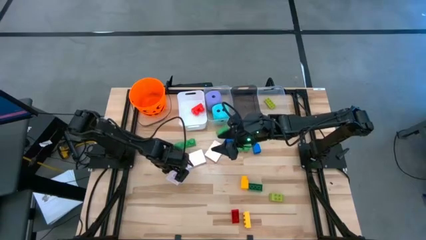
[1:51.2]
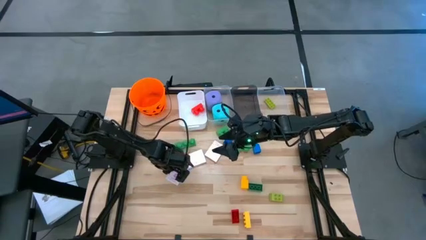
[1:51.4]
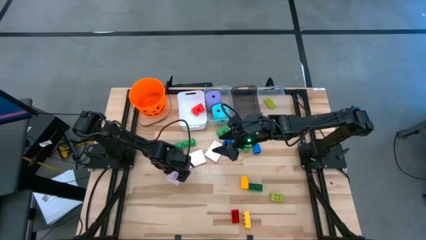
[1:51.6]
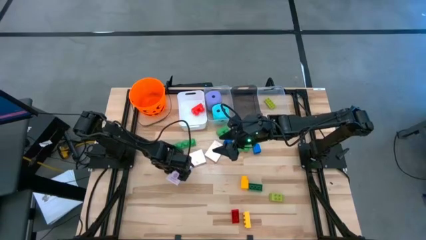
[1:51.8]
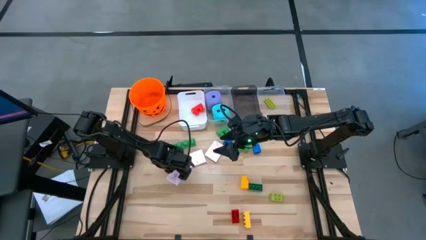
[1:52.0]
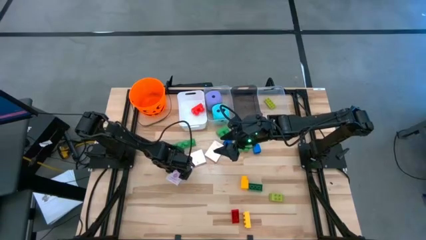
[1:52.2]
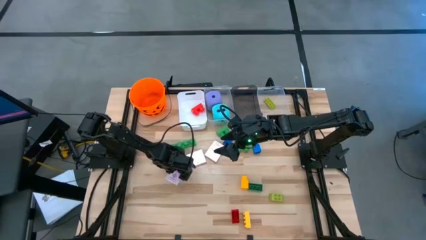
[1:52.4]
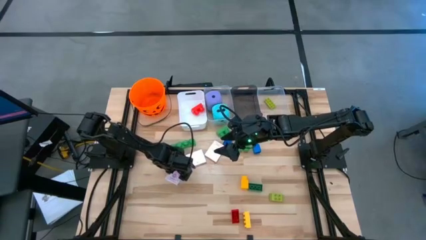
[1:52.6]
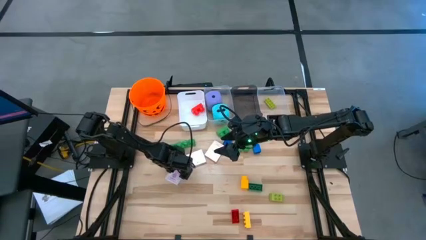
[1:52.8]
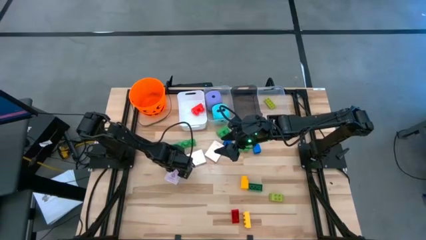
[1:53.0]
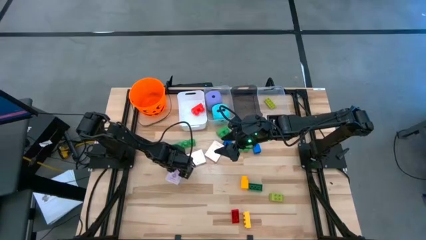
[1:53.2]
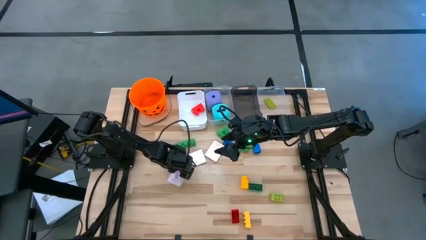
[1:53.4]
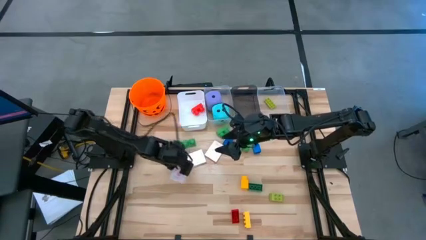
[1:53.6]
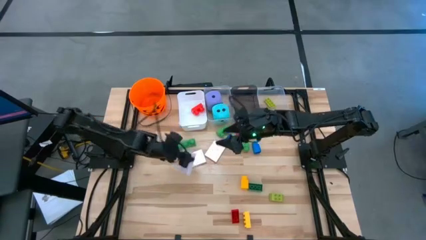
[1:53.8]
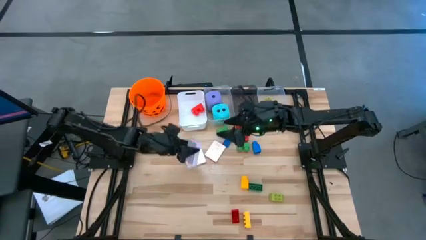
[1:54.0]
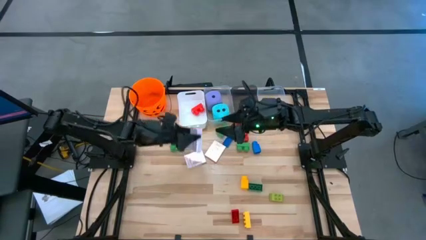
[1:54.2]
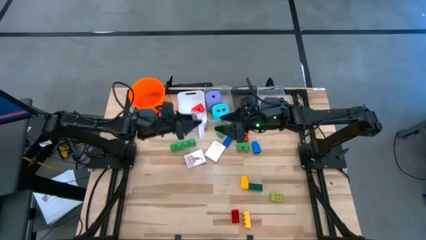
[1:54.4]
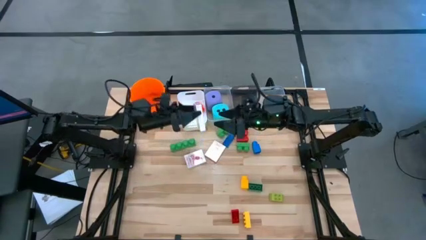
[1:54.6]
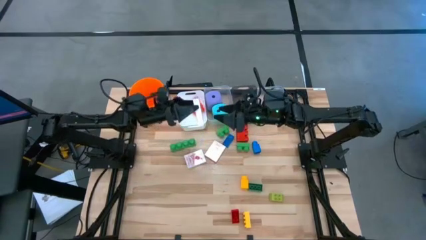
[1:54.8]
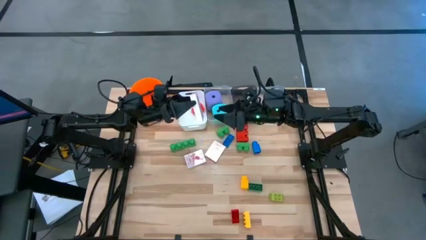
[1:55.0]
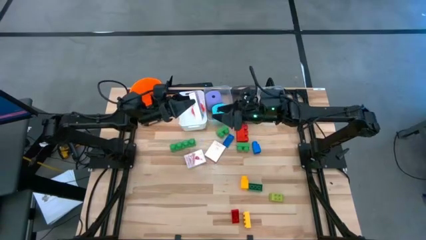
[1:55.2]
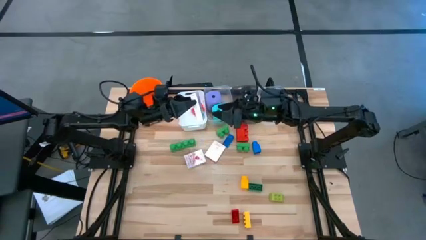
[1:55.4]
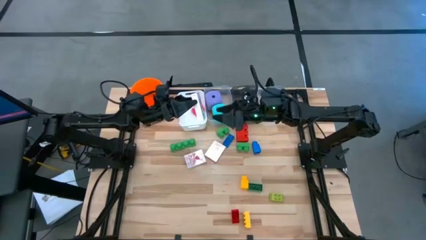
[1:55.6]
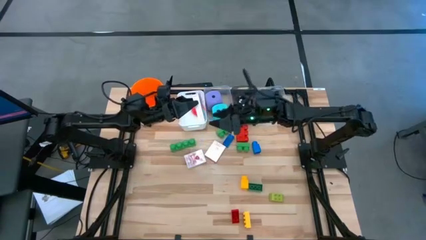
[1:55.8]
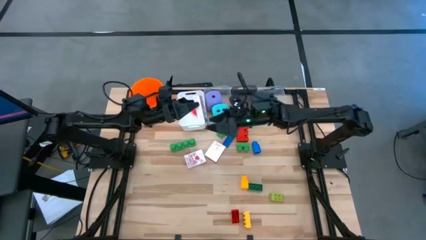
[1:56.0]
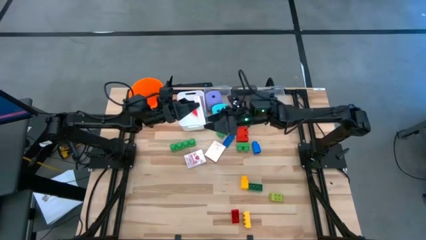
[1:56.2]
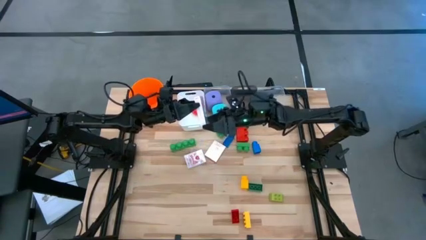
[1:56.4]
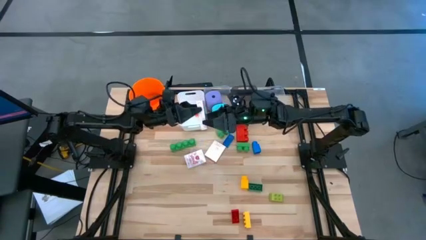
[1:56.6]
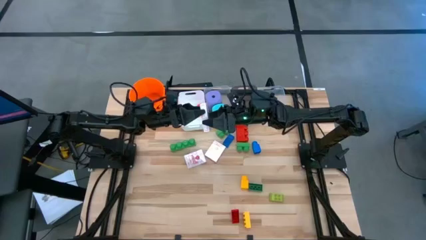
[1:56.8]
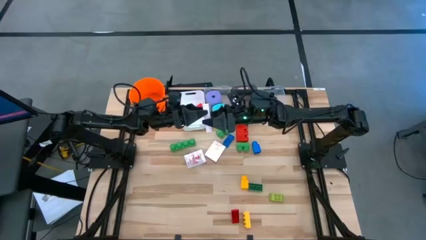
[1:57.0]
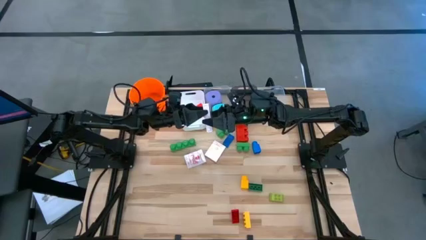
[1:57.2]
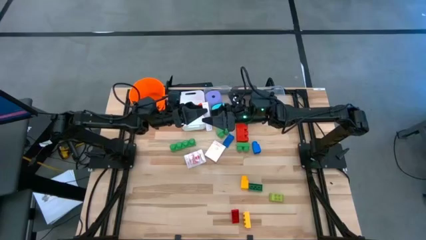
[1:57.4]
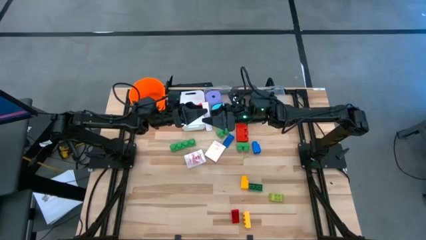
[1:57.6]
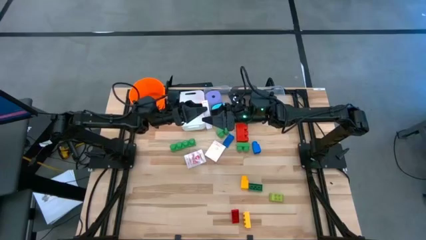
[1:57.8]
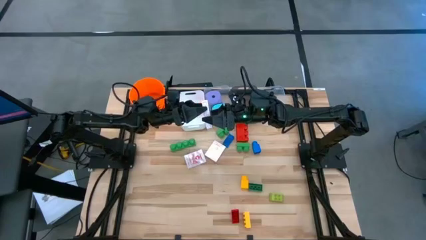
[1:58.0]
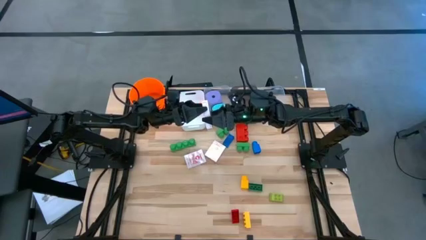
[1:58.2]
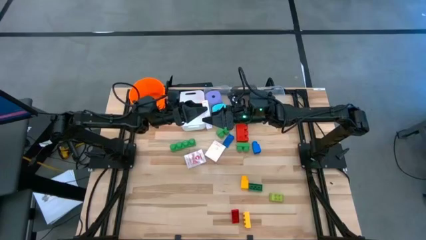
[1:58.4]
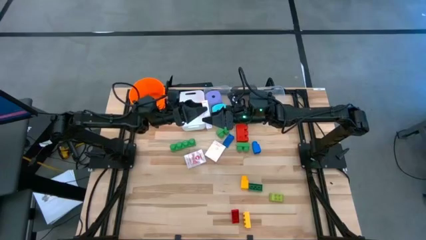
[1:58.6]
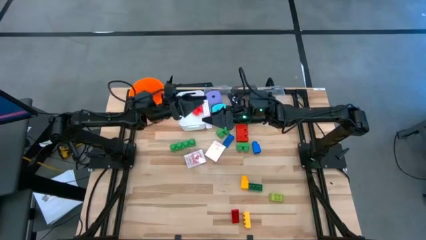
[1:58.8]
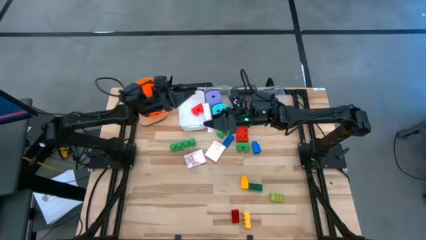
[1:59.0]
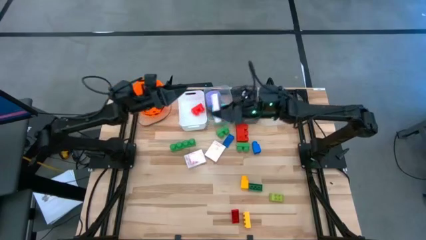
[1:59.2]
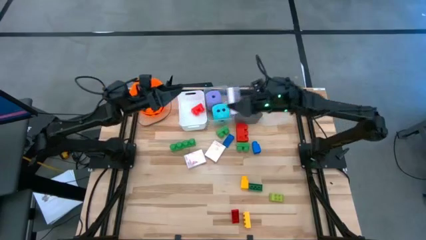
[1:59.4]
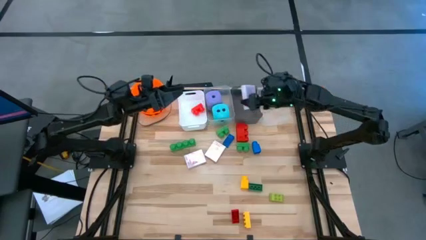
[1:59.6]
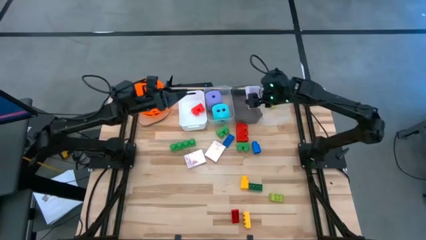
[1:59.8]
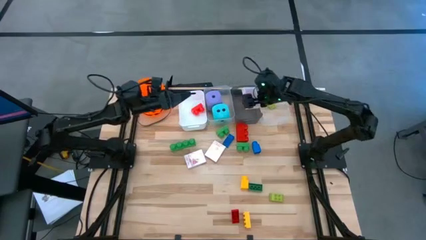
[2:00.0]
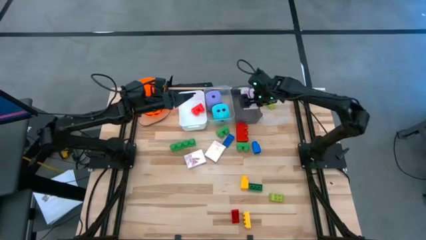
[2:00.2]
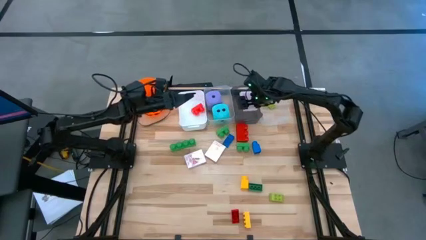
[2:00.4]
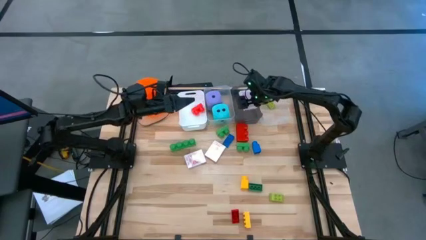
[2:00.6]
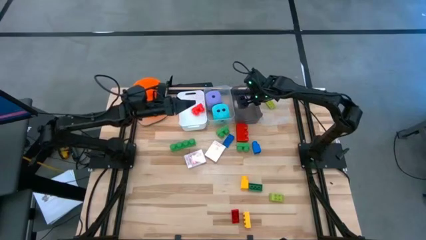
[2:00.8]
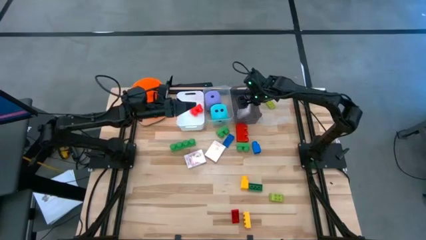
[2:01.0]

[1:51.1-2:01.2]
Task: Pick & Place Toys
Put the pink deck of cards into the black bin

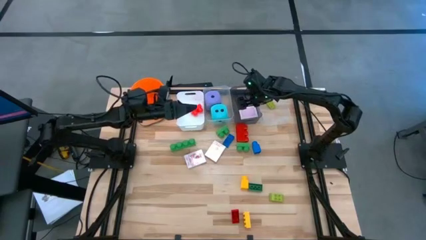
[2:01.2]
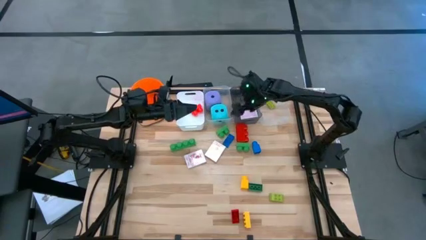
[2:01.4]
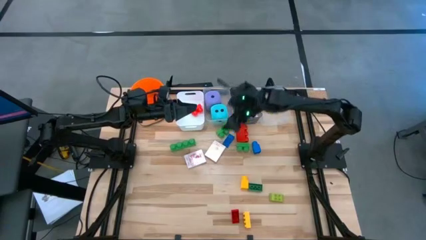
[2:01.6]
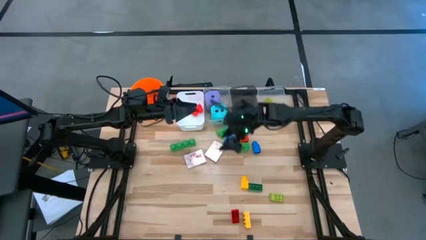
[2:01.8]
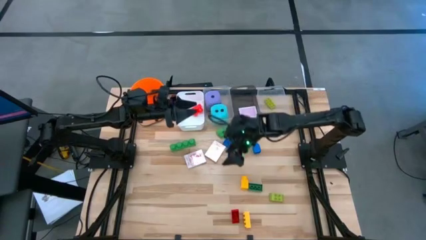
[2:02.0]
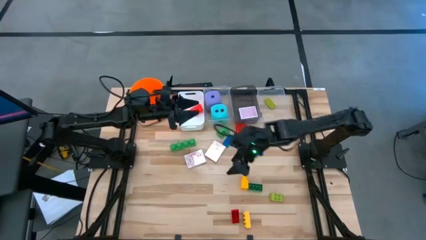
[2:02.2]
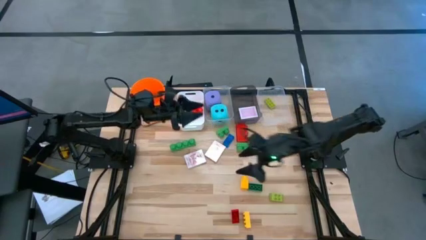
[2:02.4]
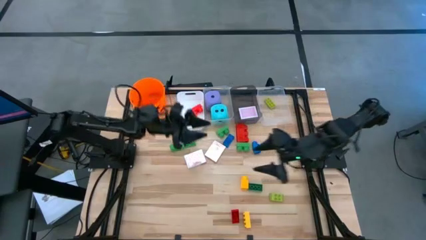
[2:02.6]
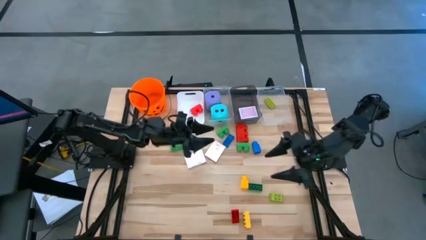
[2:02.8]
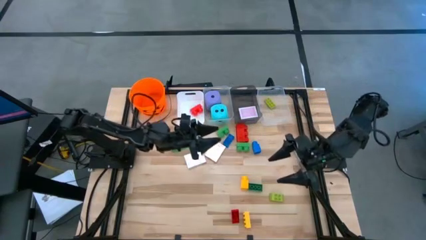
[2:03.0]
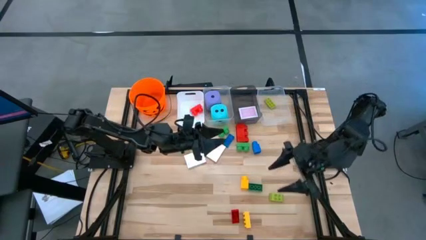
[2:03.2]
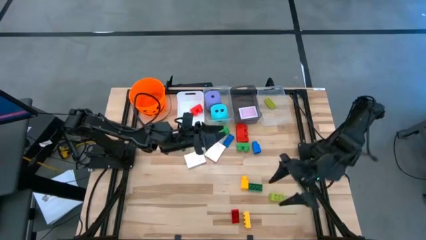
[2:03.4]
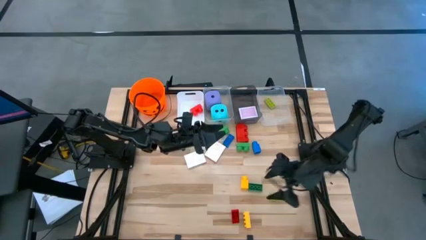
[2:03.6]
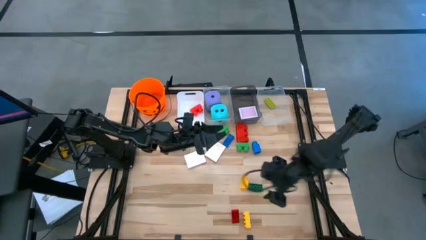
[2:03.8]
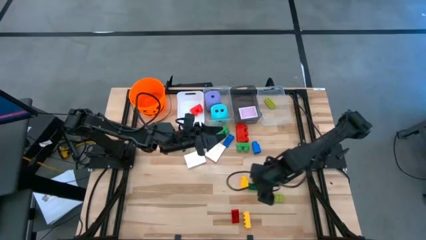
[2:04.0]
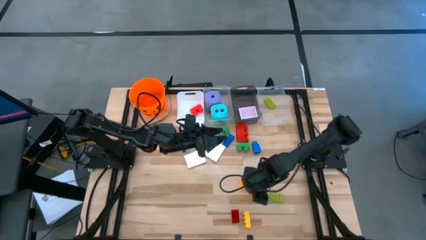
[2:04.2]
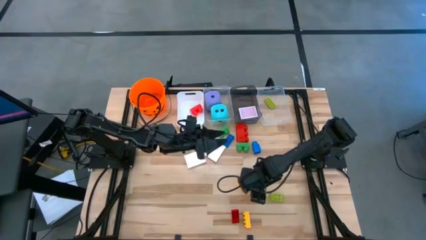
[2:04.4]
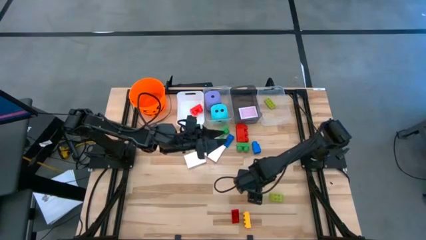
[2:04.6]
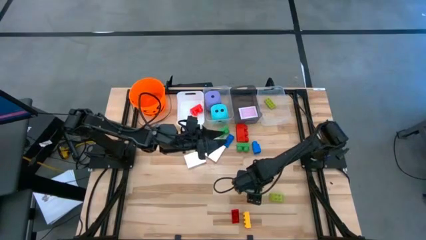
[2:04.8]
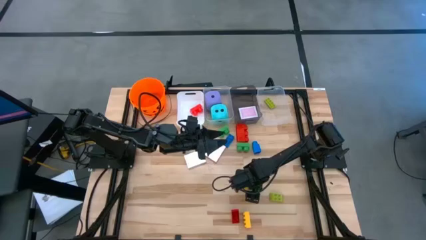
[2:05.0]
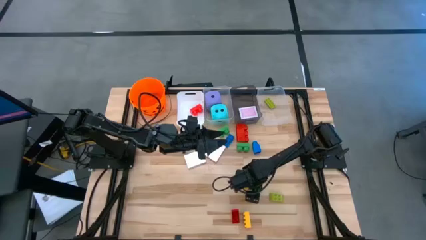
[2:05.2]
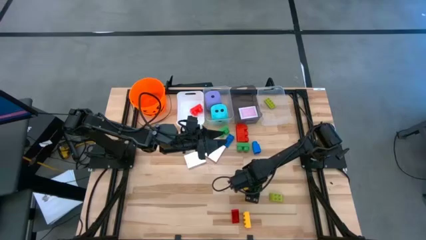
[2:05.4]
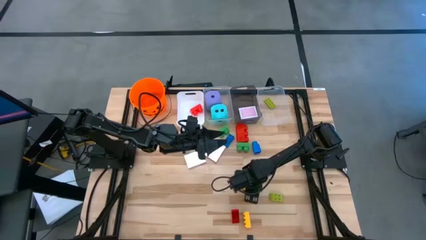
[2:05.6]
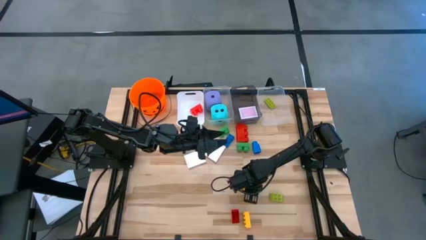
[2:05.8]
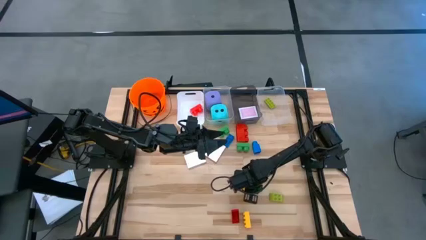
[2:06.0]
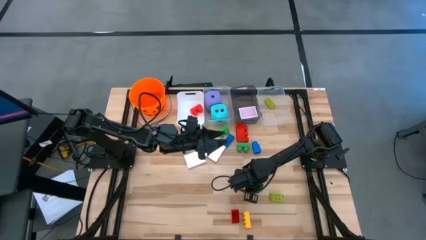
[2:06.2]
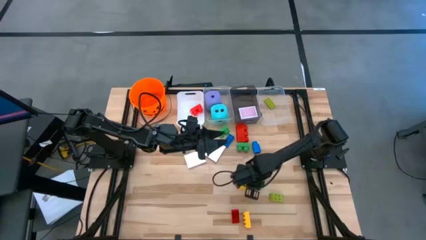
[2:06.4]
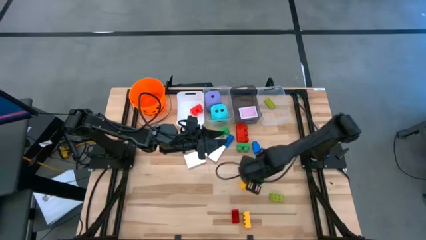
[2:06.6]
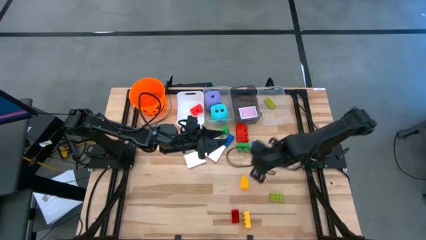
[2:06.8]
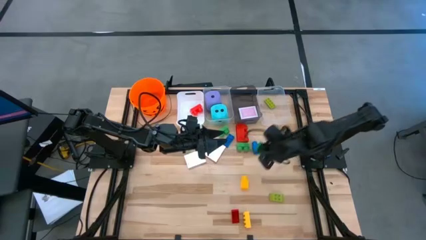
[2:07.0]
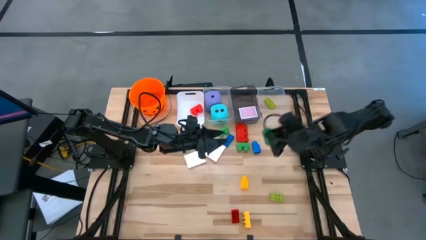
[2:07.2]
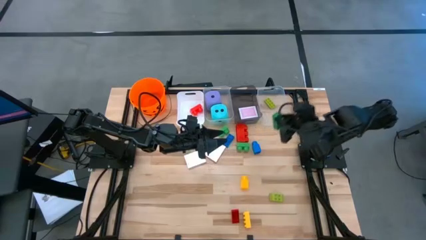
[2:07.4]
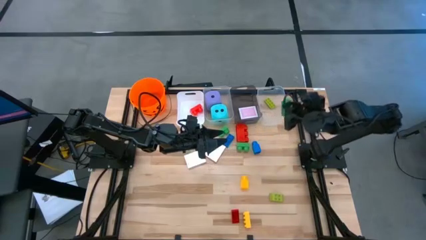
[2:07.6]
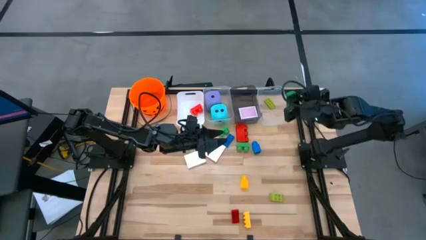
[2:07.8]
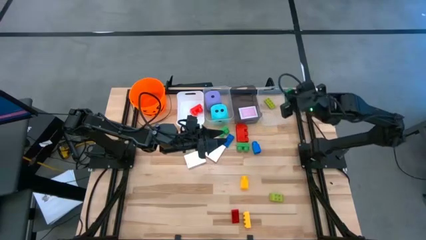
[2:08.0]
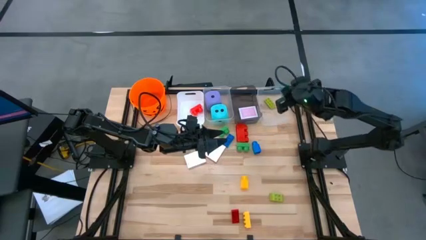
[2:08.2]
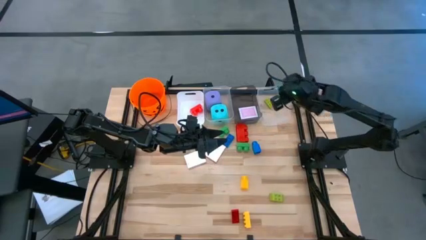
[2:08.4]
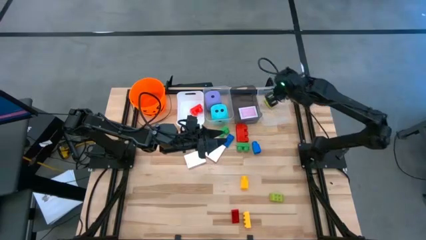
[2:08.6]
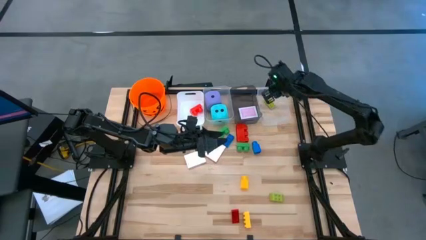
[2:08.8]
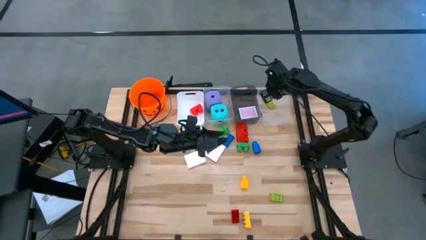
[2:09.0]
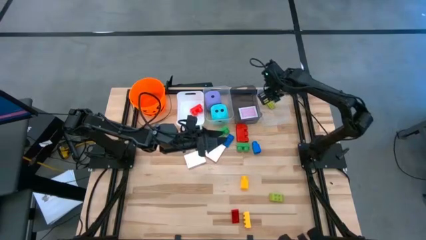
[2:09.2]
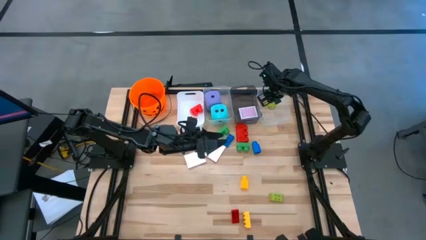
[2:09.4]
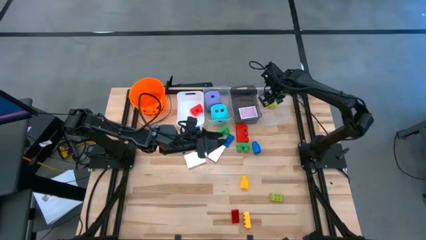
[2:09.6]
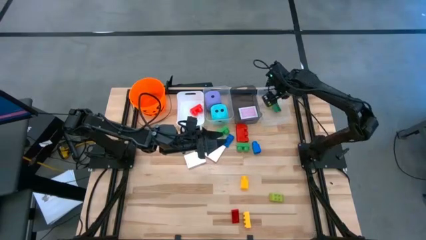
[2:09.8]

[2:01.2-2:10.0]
Put the dark green game piece into the right transparent bin
